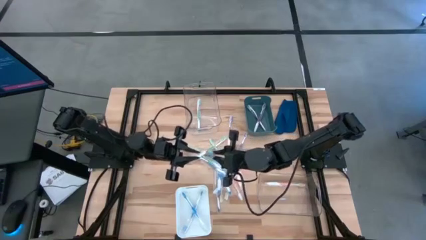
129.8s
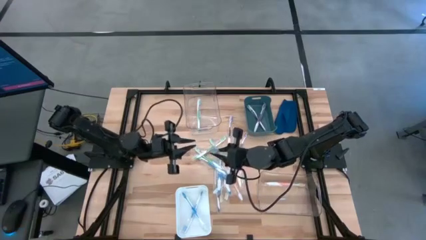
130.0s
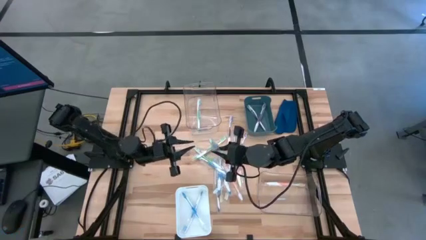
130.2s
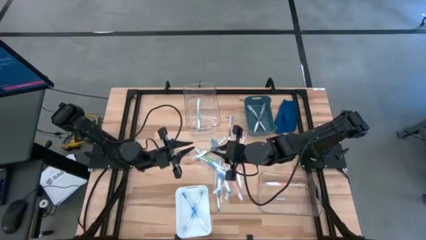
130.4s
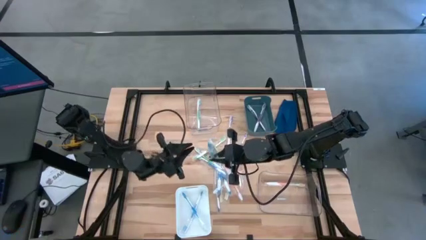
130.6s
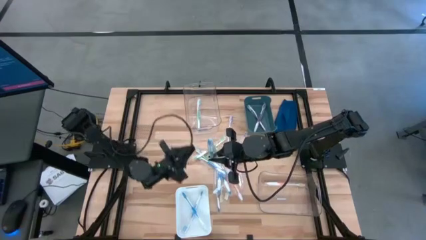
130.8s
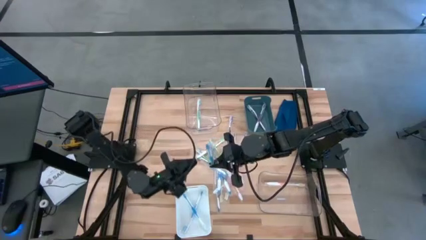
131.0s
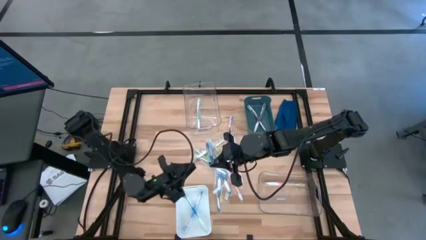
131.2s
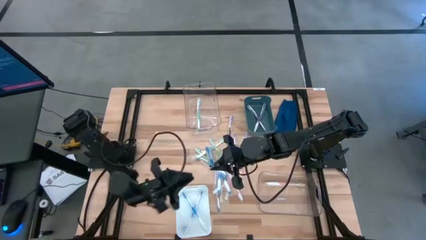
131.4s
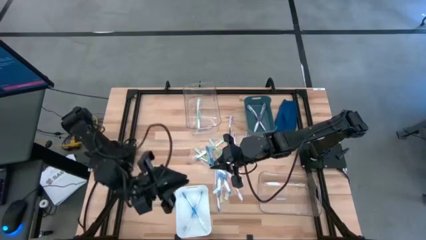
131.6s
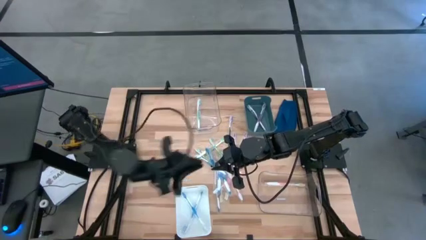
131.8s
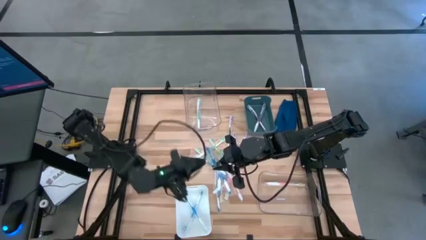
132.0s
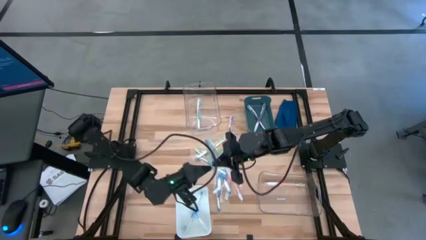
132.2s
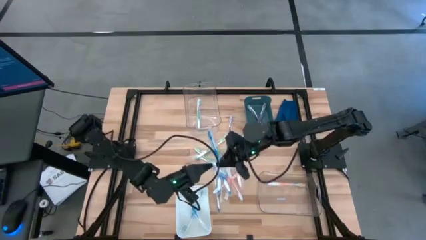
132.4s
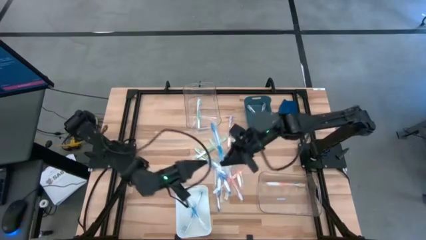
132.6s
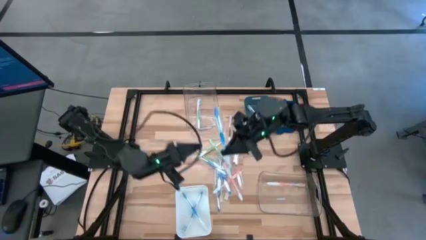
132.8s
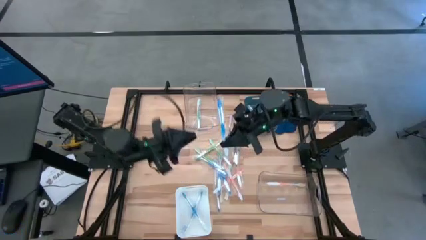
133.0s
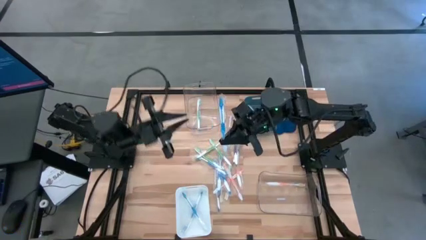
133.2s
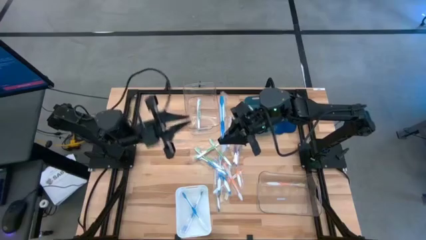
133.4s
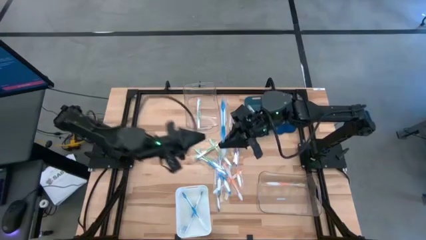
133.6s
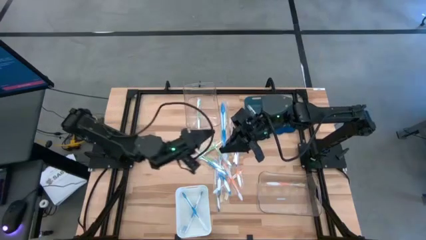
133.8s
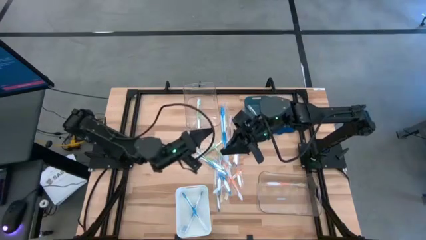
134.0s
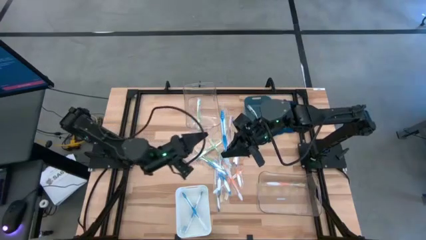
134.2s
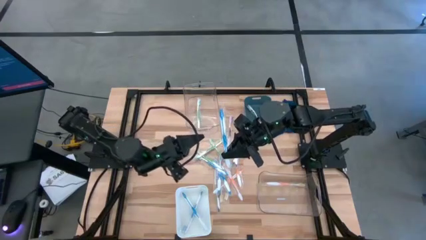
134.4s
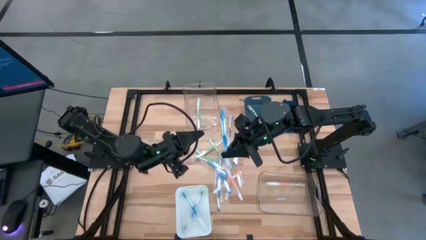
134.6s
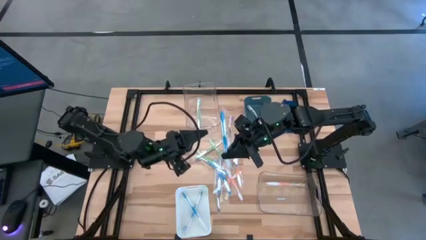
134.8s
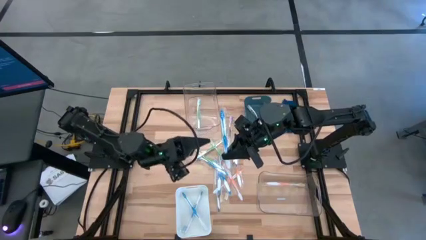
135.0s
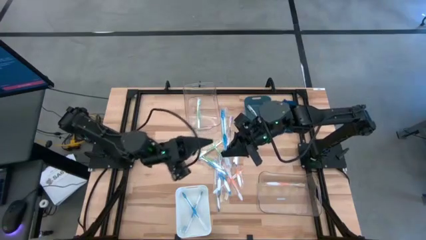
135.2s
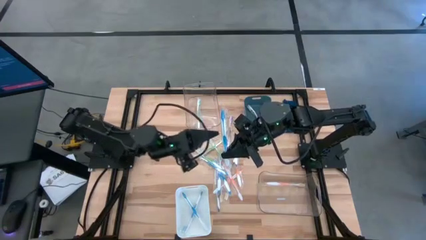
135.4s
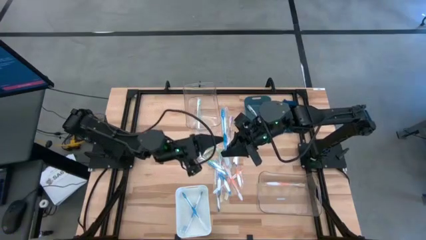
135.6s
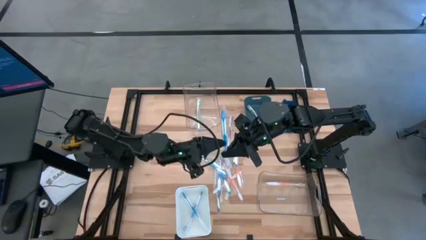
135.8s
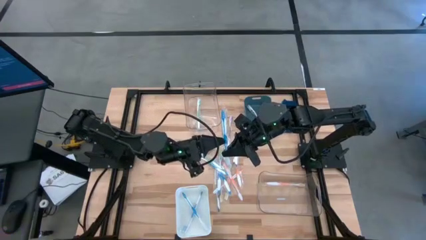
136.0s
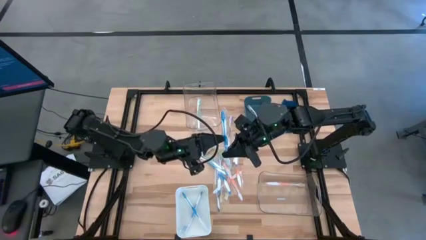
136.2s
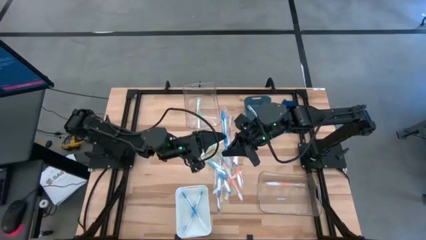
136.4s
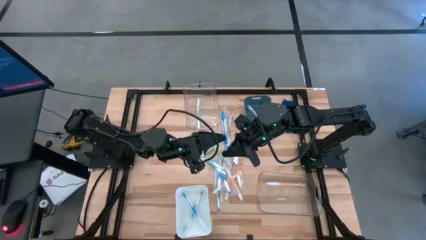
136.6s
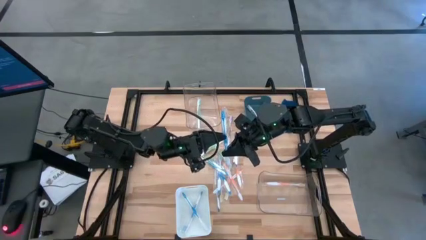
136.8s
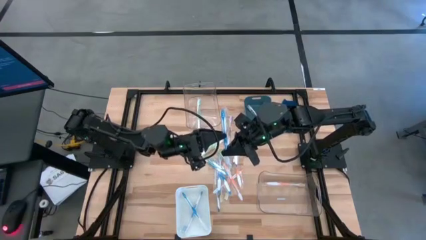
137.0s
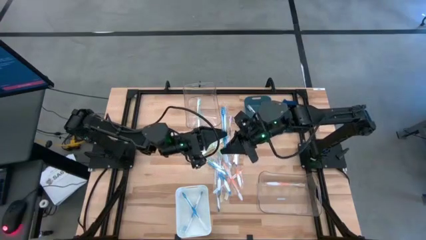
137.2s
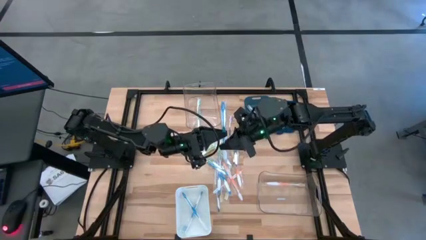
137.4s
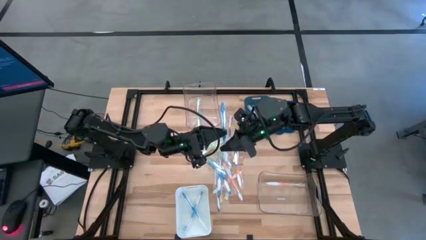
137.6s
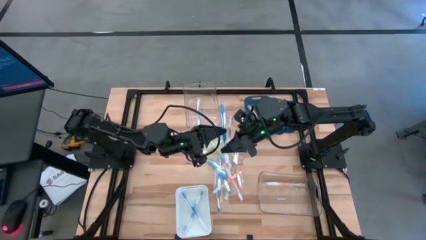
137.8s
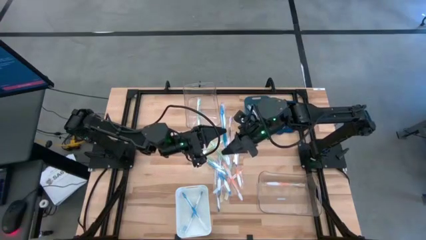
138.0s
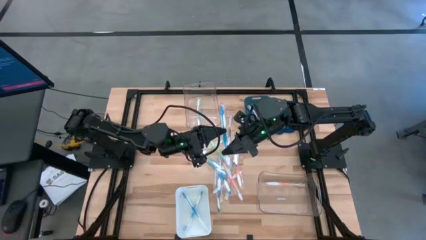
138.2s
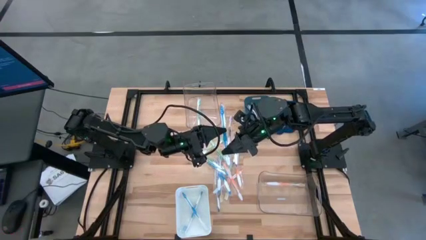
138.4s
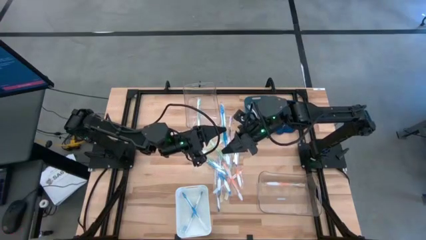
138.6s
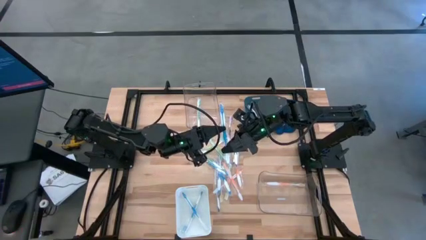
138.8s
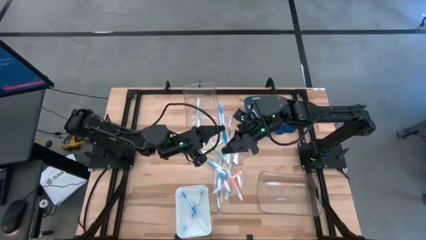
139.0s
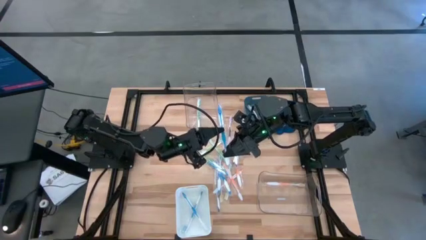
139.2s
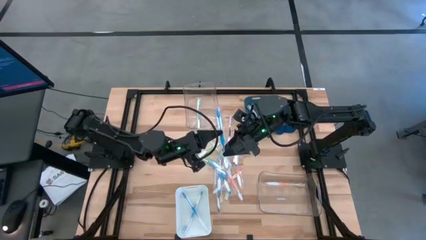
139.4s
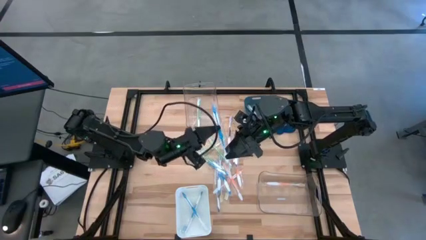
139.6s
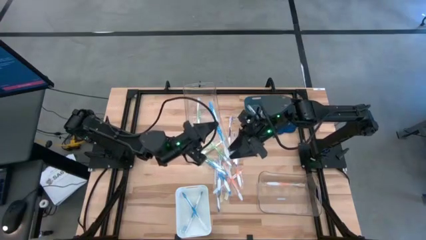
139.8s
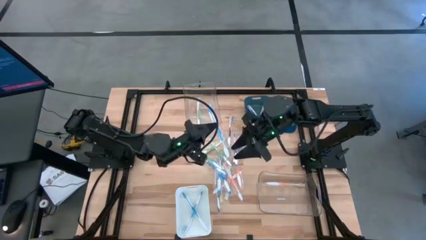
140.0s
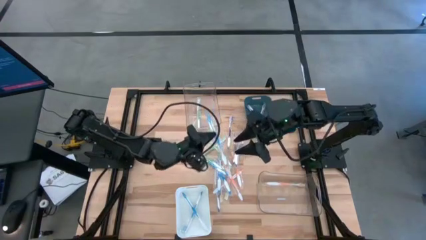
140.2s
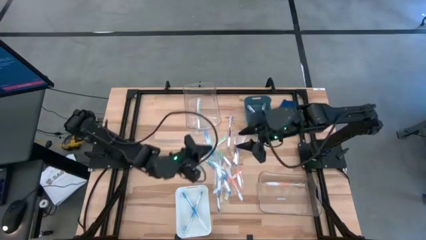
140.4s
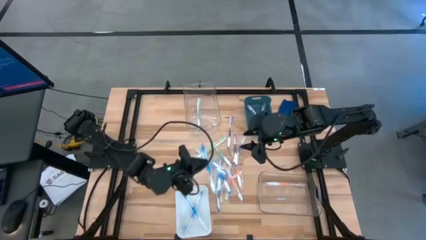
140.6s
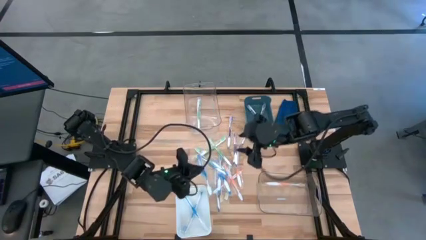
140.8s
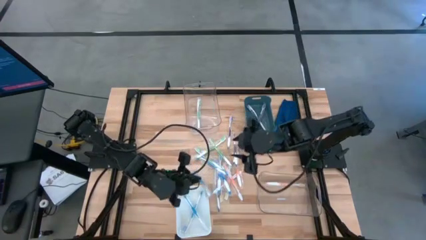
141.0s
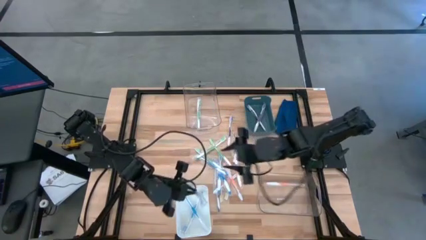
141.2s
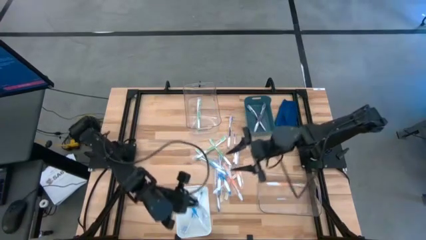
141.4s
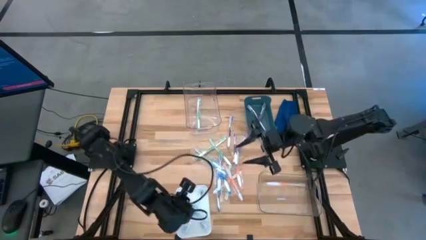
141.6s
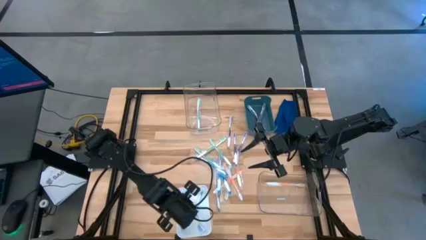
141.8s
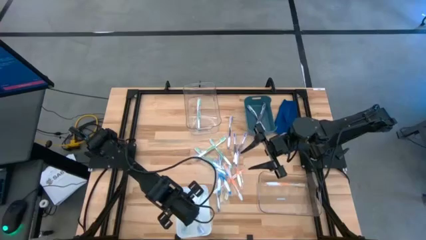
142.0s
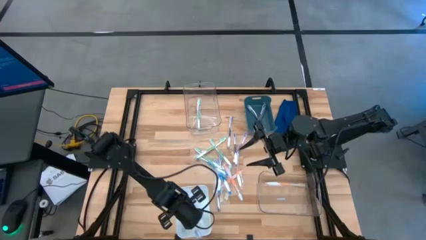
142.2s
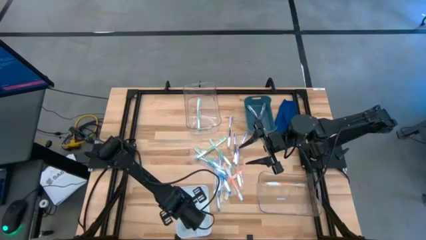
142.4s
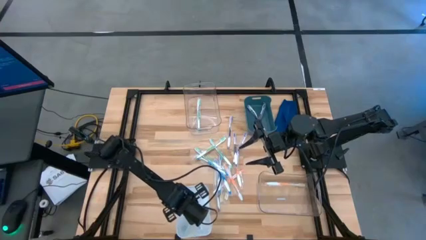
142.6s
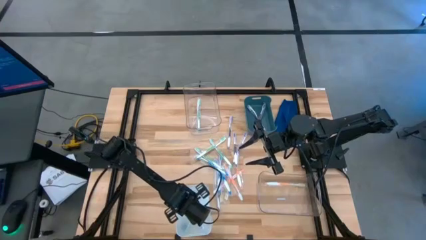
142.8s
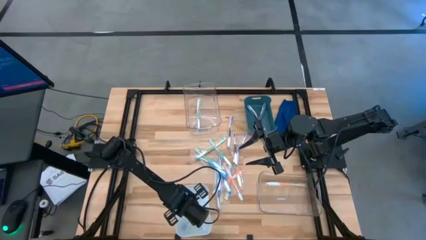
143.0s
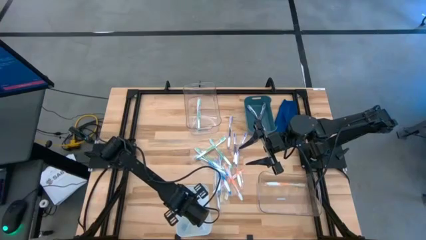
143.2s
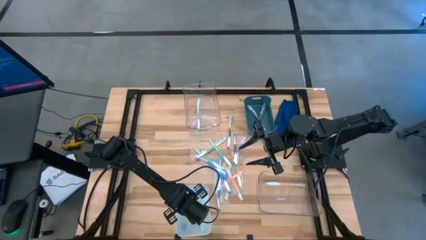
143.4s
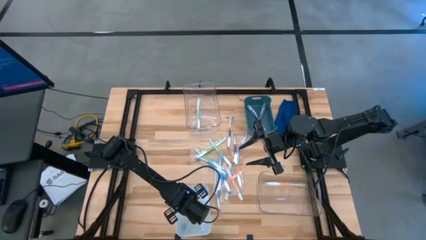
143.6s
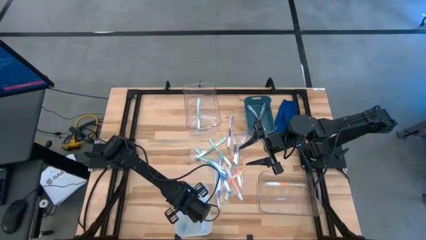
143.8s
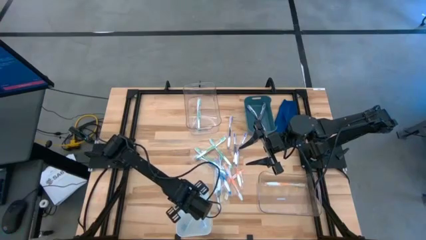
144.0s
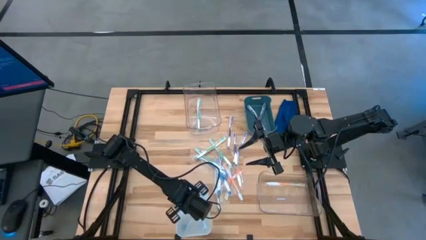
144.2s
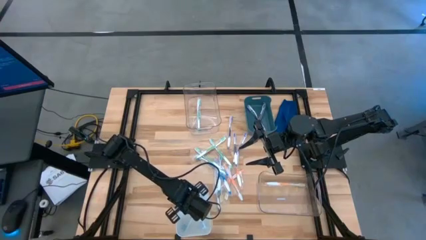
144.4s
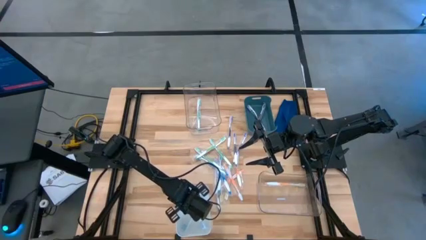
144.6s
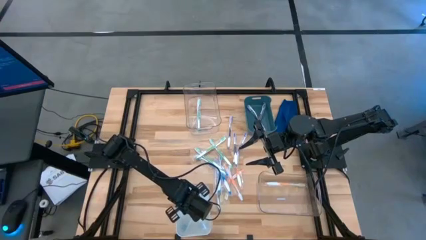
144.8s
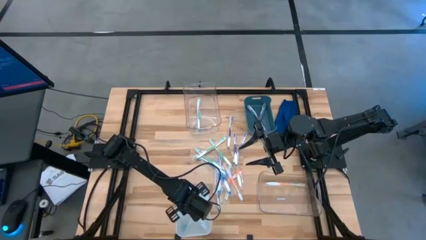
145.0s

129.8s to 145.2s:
Task: Pick & Place Toothbrushes
Put the blue toothbrush into the white bin
